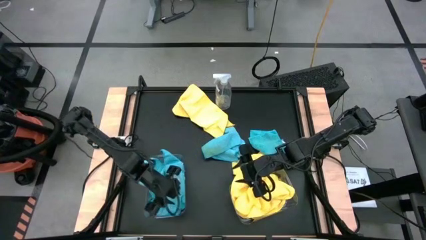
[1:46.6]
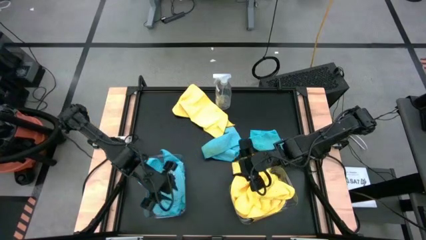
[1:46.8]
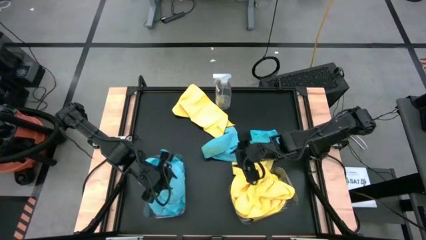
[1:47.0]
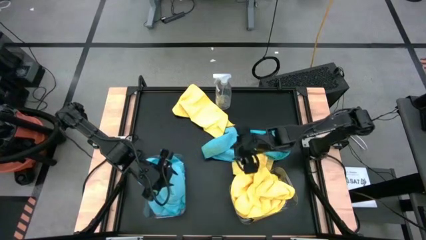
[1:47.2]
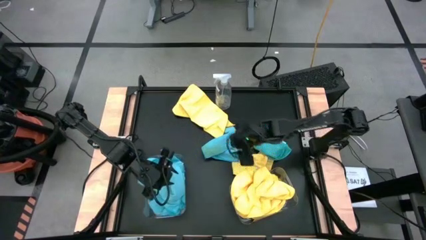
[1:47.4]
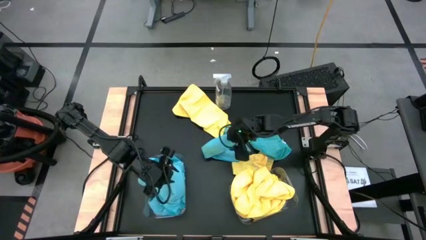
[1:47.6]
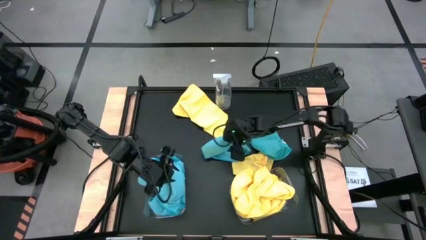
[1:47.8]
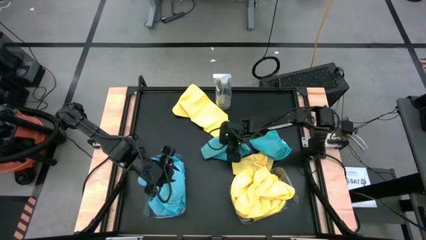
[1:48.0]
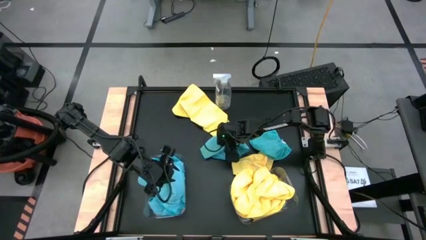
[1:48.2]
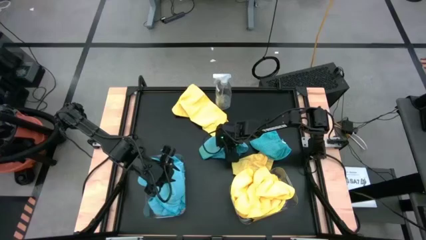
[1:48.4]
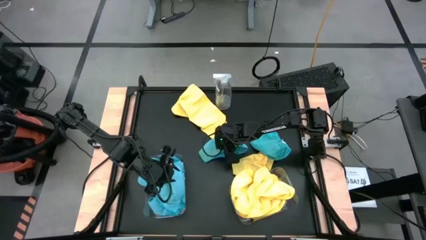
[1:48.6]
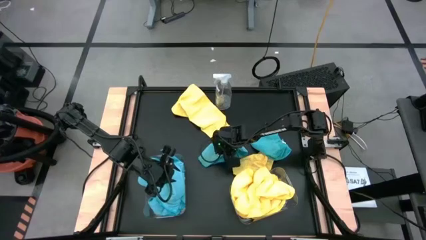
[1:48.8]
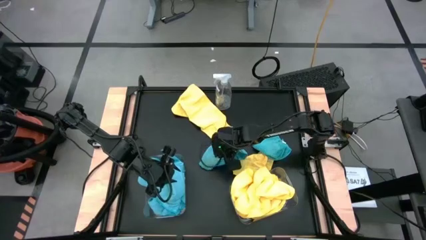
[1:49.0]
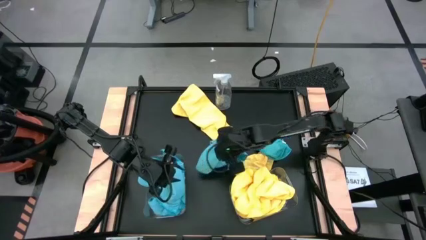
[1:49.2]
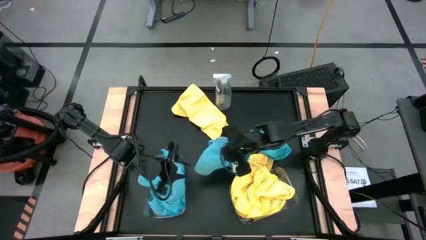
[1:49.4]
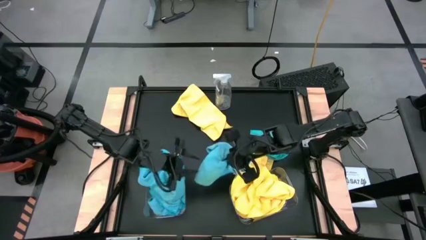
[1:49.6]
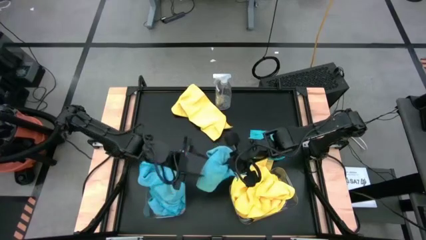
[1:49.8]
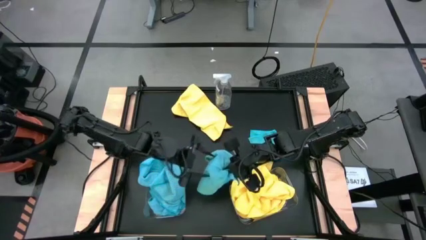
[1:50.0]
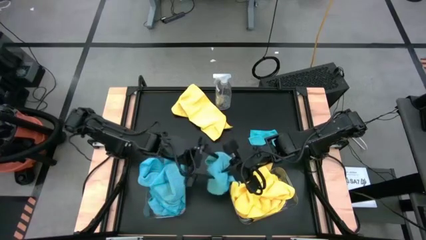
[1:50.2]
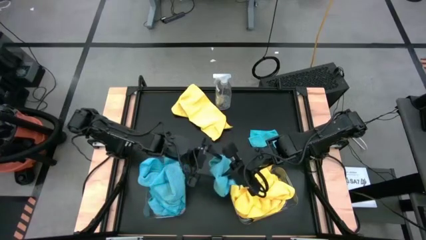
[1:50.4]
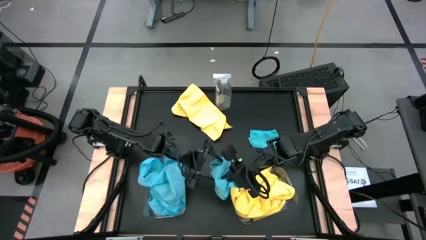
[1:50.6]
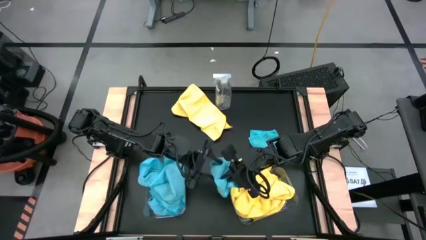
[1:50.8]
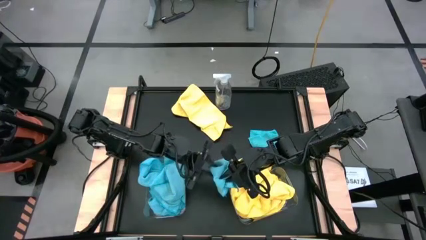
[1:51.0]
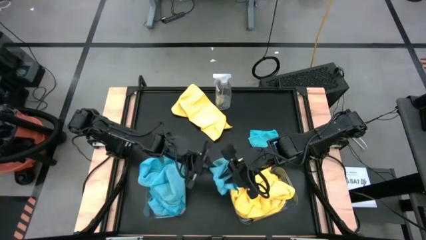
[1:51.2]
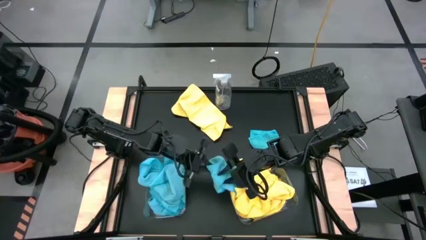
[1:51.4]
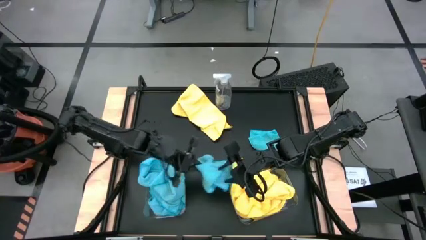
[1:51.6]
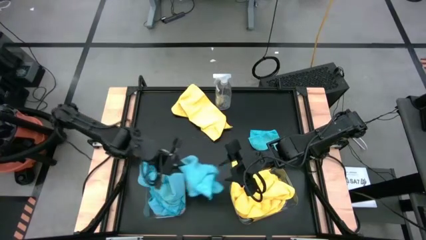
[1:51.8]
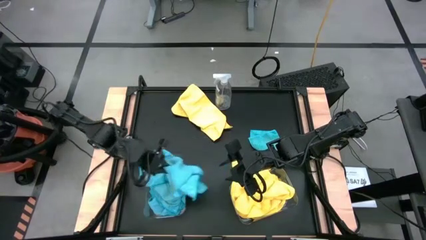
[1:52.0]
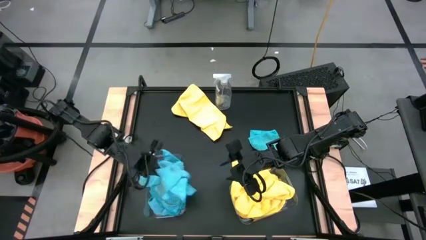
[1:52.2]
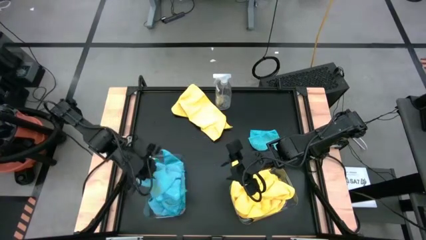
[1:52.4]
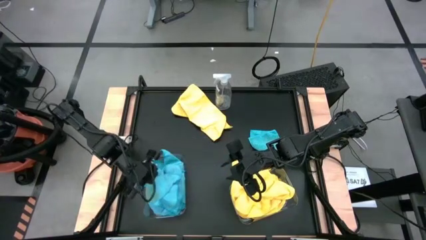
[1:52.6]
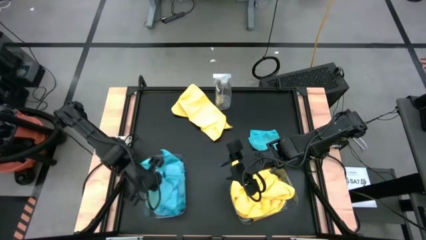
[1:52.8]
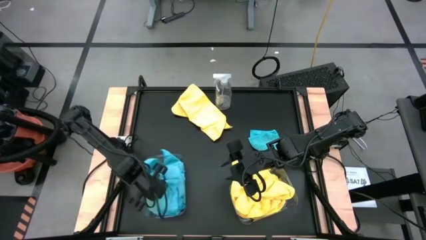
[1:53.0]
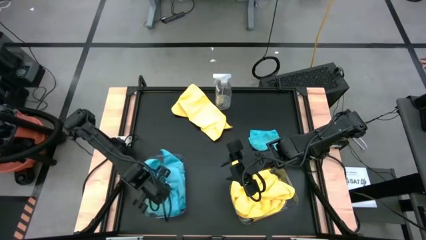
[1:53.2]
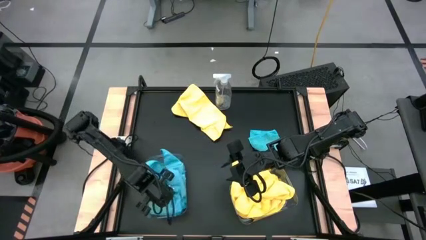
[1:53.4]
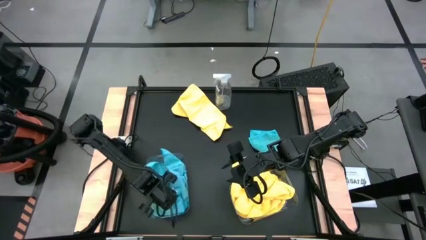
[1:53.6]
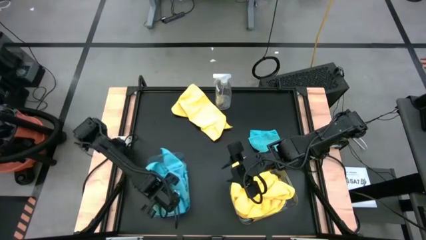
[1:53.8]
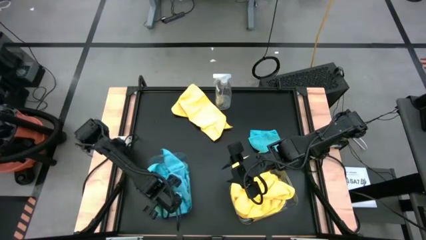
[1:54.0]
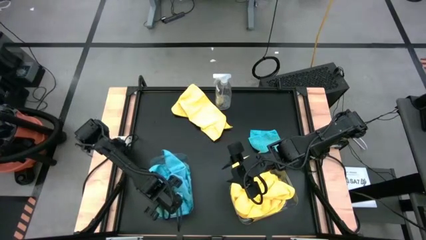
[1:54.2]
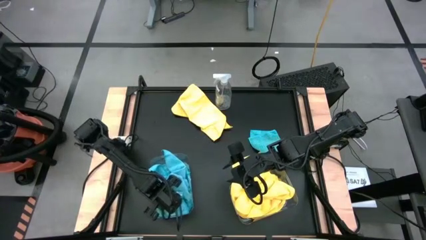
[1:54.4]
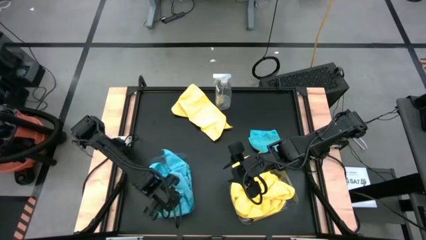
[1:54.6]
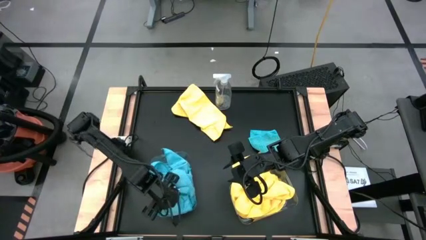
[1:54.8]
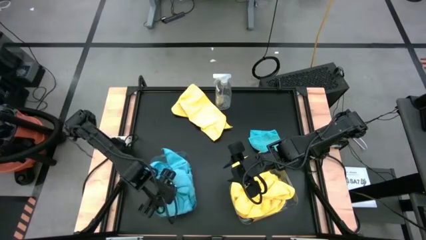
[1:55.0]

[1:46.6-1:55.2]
Task: Sort microfiber towel by color & place in baskets
Put the blue microfiber towel into the left transparent bin

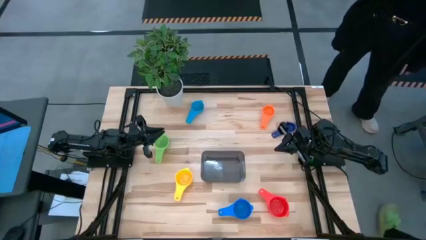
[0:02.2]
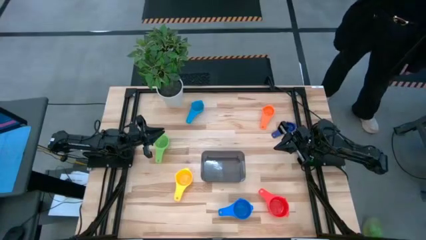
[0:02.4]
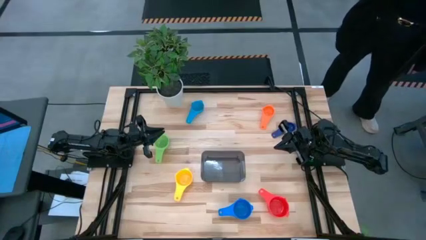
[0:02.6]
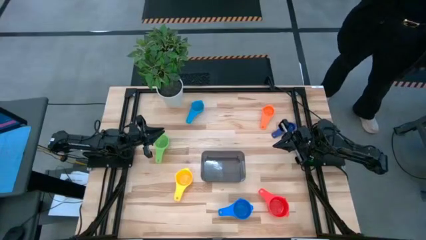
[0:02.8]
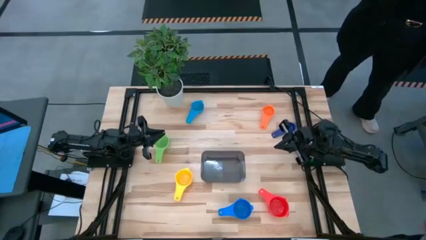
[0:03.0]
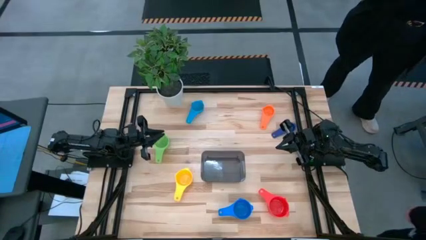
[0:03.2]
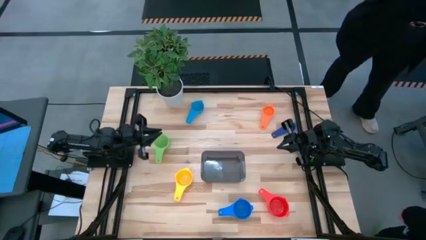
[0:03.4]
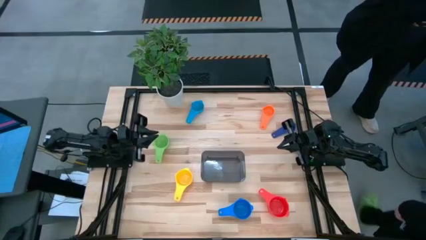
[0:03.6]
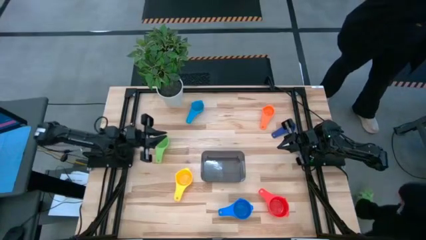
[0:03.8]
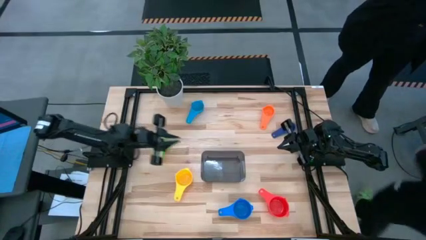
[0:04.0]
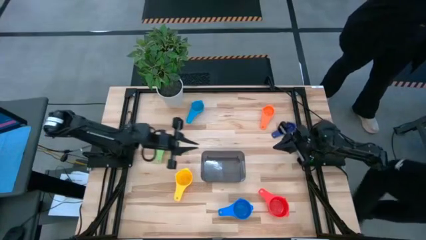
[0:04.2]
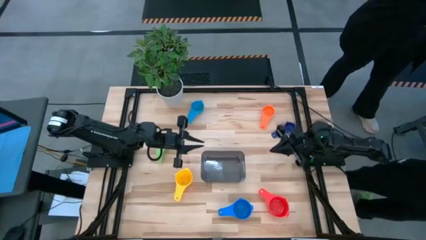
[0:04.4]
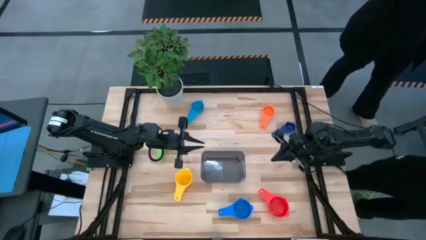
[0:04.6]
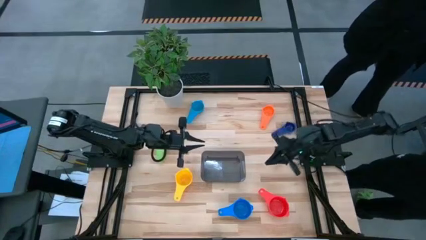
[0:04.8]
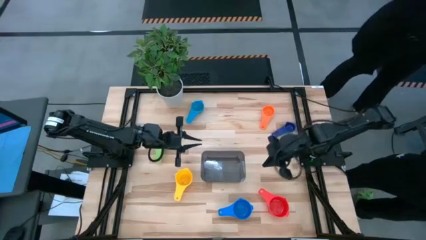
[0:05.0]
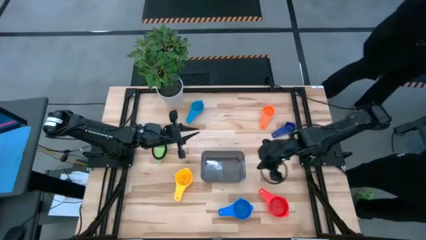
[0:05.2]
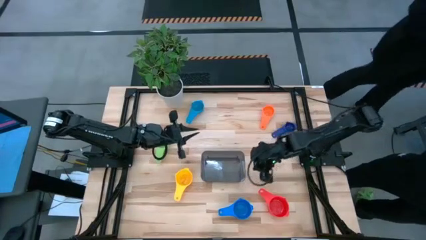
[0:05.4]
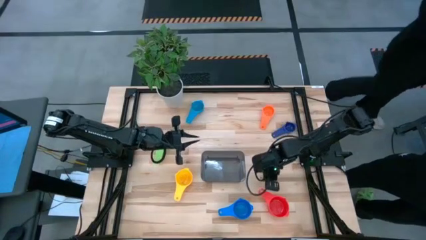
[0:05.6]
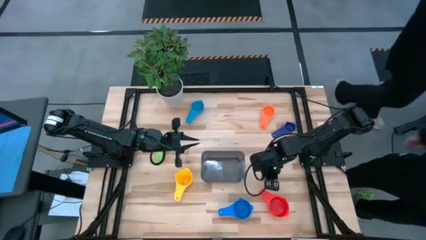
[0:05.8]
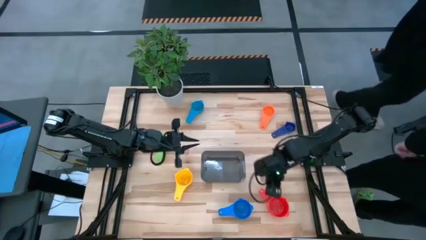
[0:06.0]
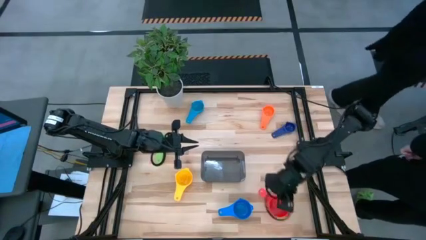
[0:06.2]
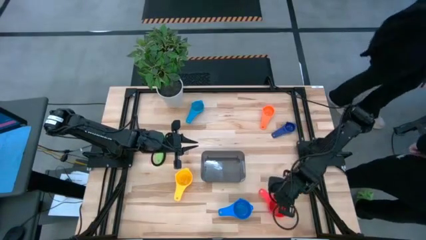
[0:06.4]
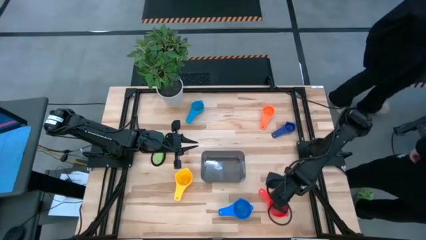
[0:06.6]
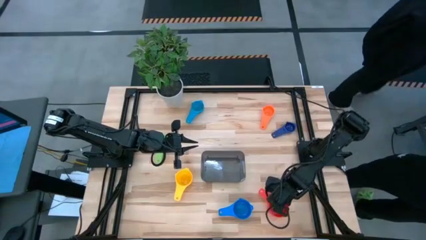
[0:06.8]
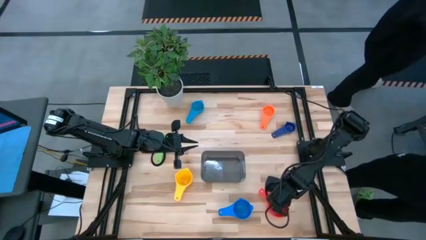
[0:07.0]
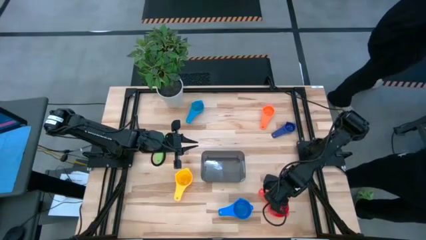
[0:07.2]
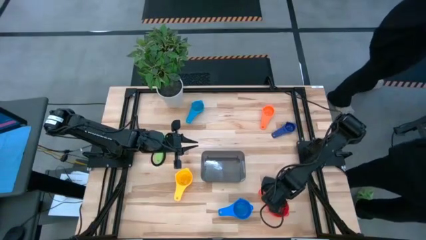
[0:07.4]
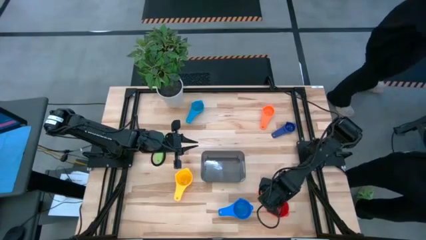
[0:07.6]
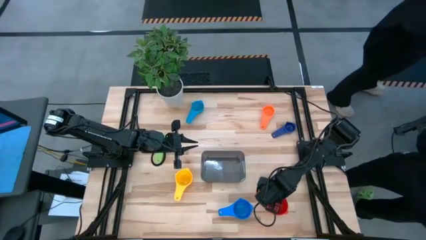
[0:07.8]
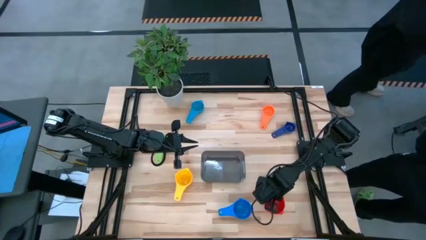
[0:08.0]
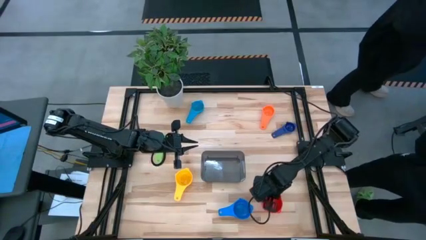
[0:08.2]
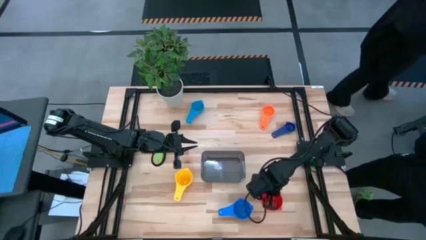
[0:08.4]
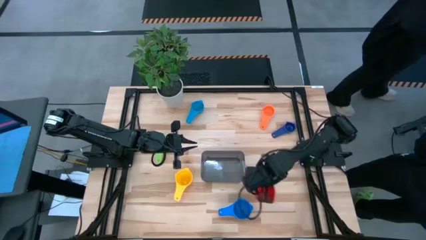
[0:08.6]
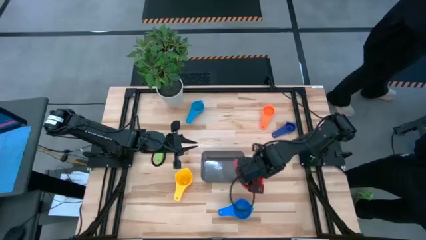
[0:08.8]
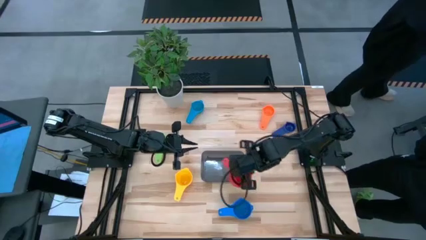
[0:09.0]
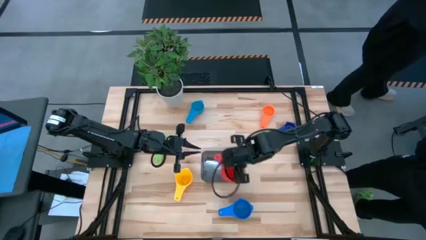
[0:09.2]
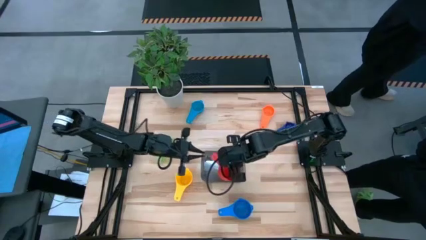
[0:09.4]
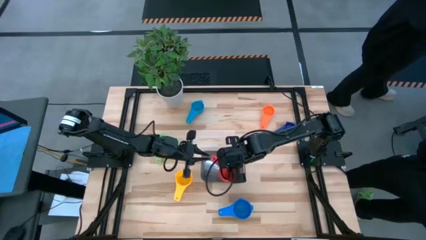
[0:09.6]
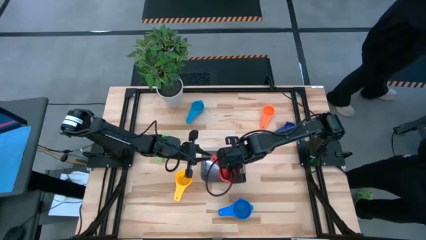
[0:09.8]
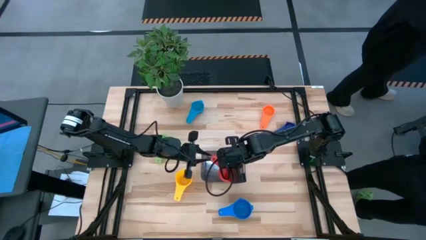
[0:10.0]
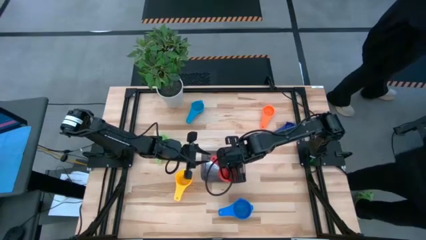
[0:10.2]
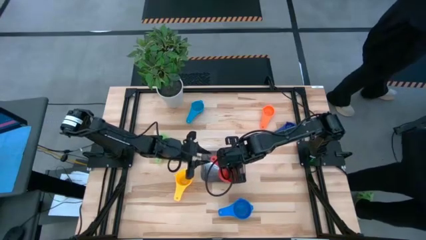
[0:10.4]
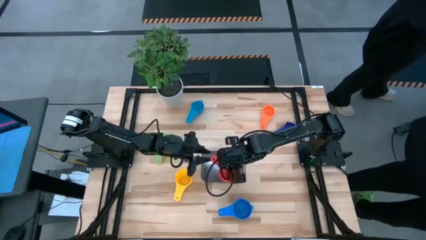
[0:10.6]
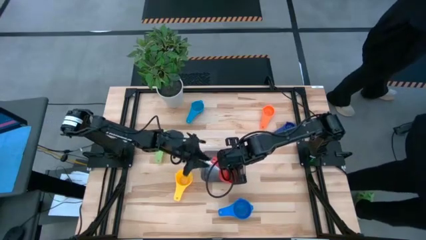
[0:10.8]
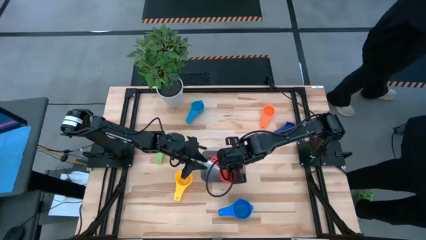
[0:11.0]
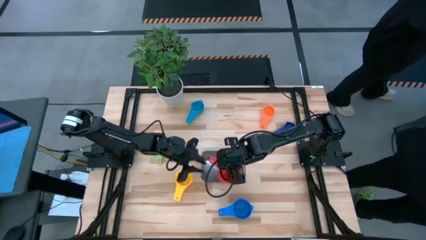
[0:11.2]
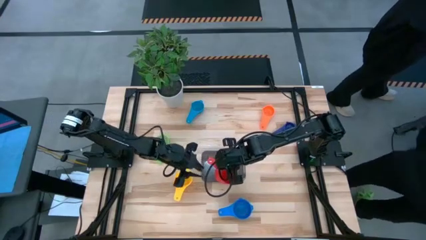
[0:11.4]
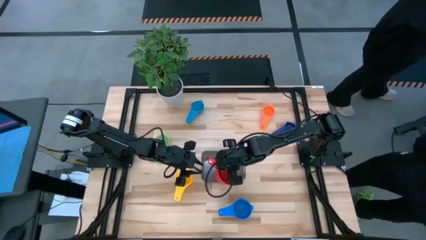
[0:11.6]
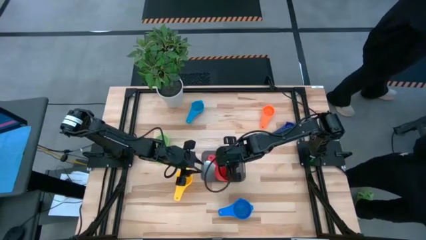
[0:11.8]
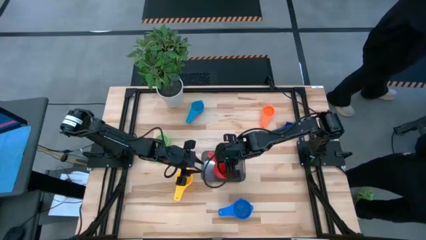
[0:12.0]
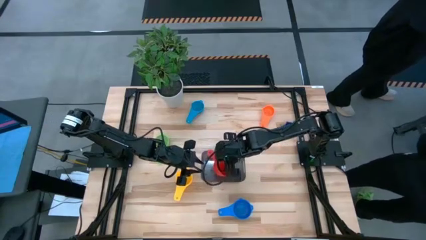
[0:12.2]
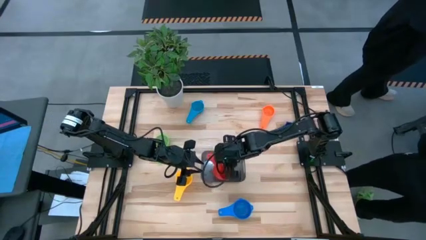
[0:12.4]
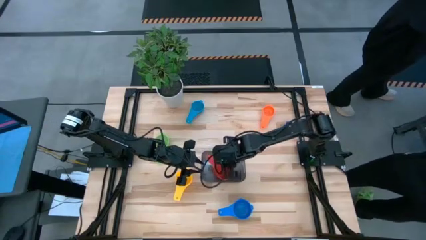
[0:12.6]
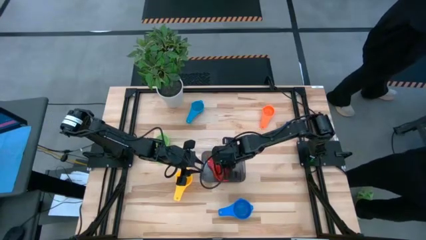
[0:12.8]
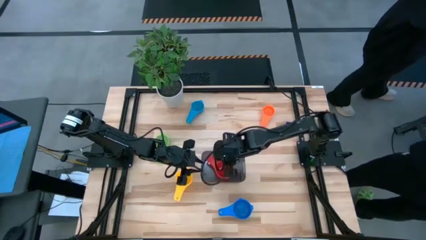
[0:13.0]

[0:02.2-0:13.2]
Task: Nest measuring cups in basket
Put the red measuring cup into the black bin
